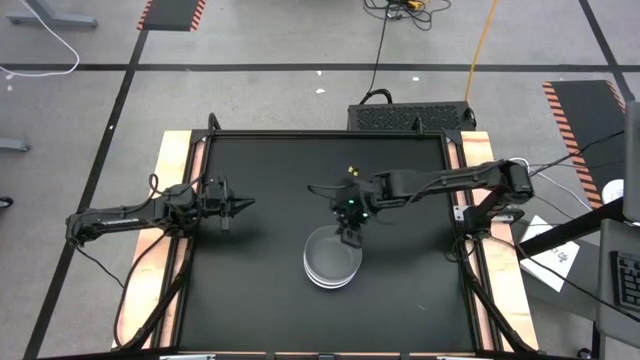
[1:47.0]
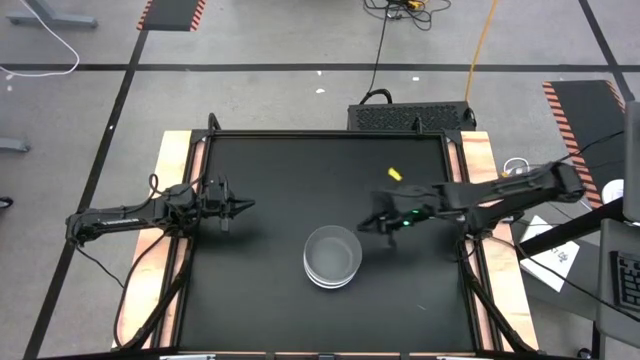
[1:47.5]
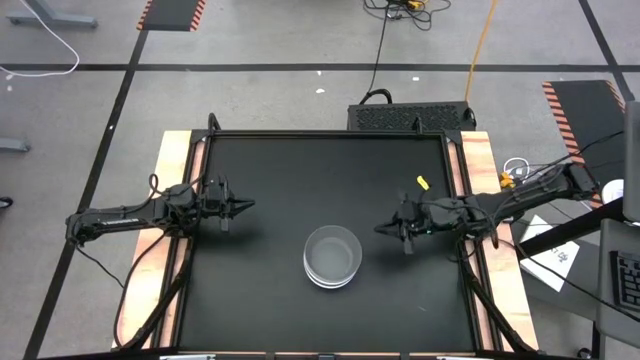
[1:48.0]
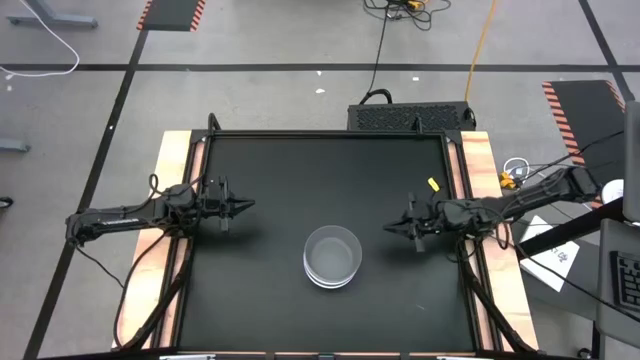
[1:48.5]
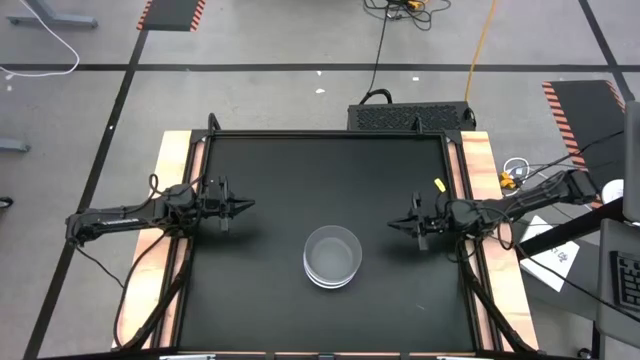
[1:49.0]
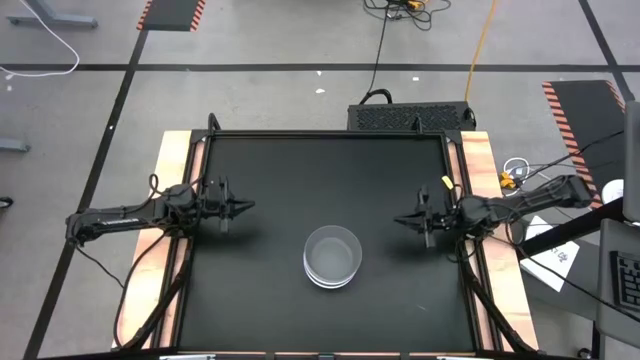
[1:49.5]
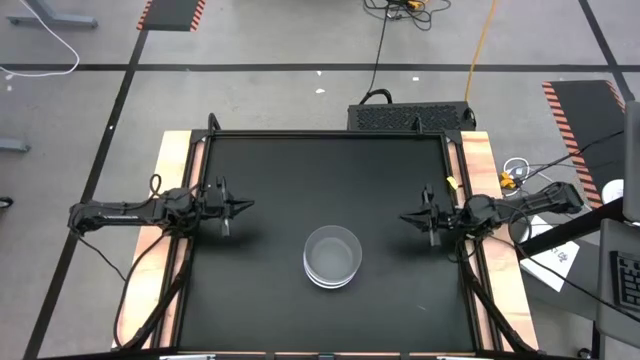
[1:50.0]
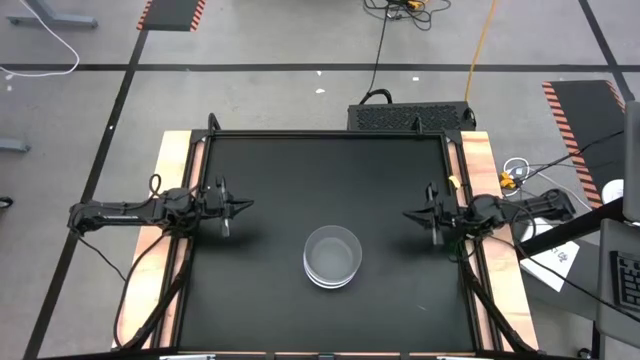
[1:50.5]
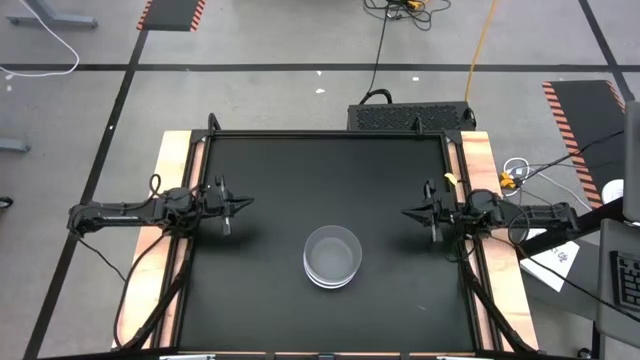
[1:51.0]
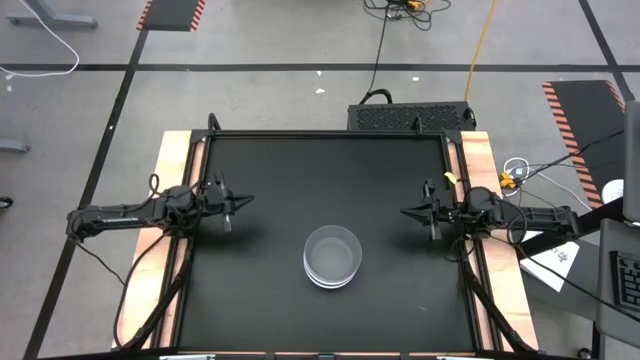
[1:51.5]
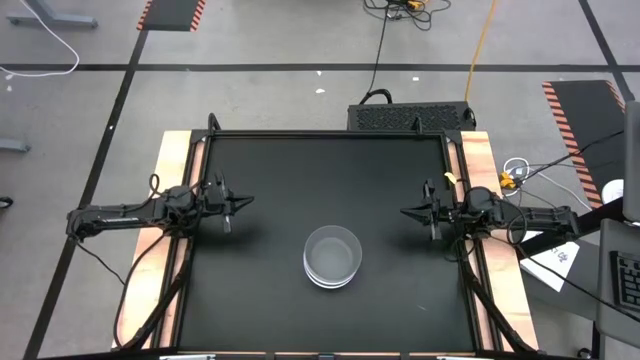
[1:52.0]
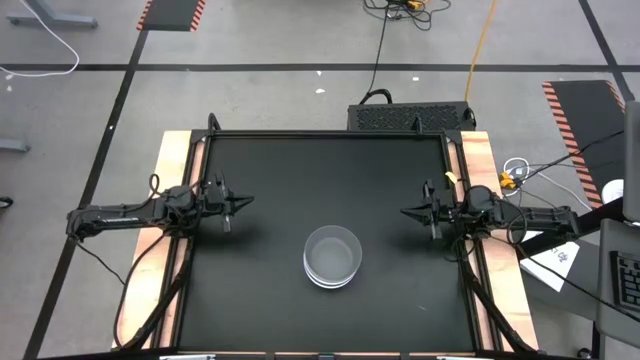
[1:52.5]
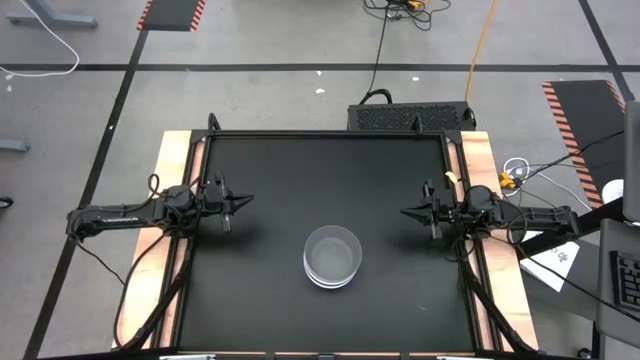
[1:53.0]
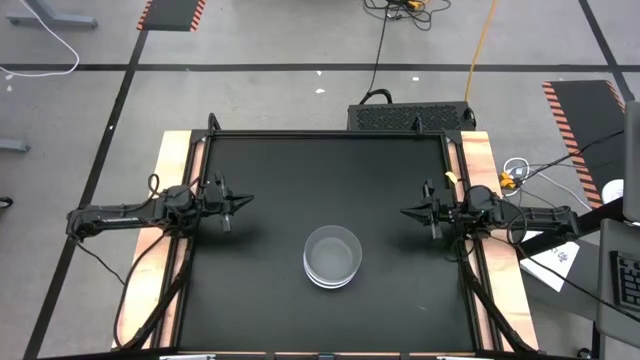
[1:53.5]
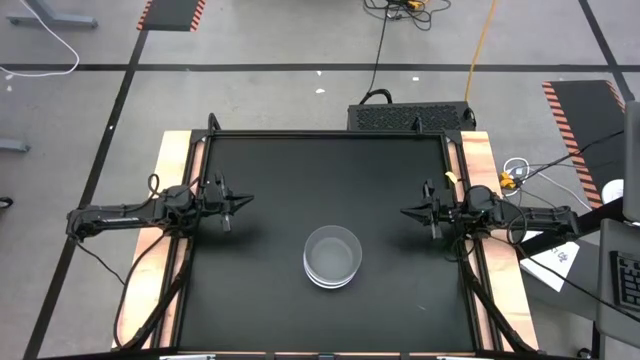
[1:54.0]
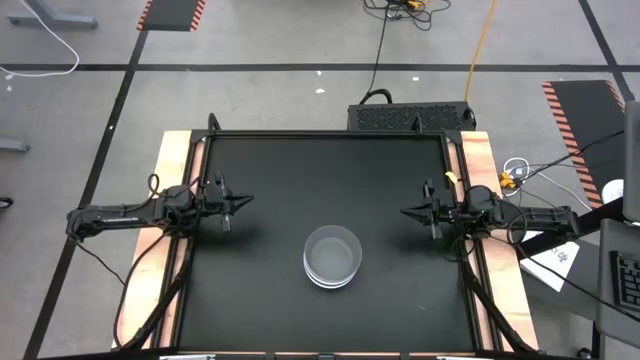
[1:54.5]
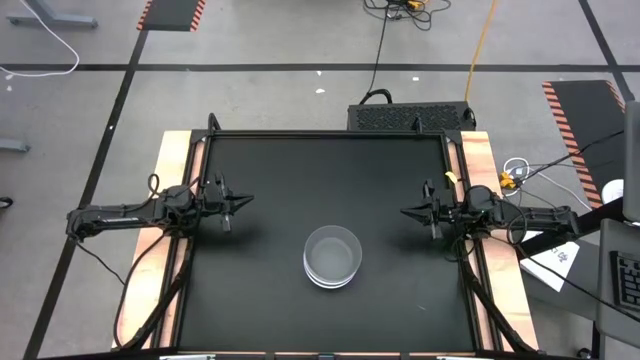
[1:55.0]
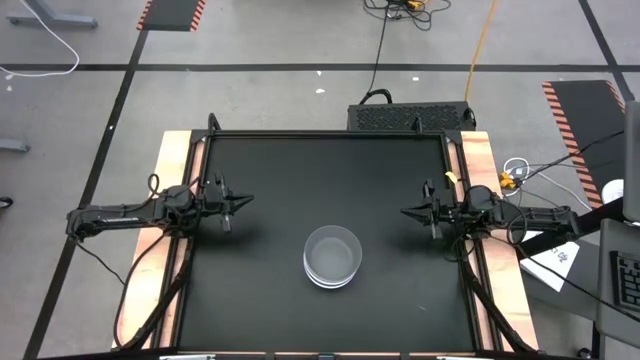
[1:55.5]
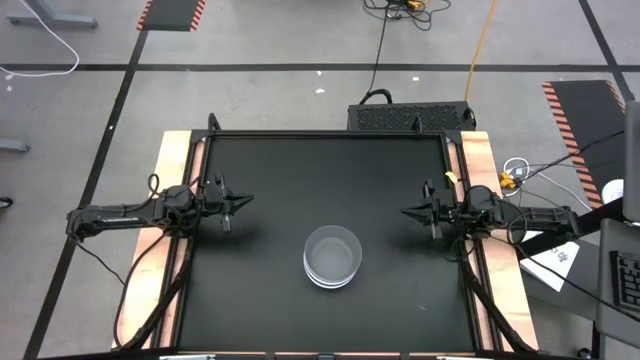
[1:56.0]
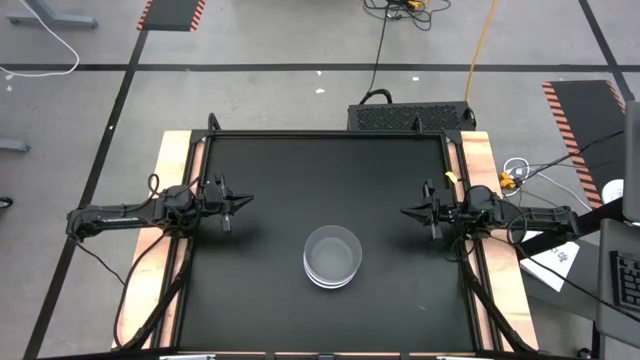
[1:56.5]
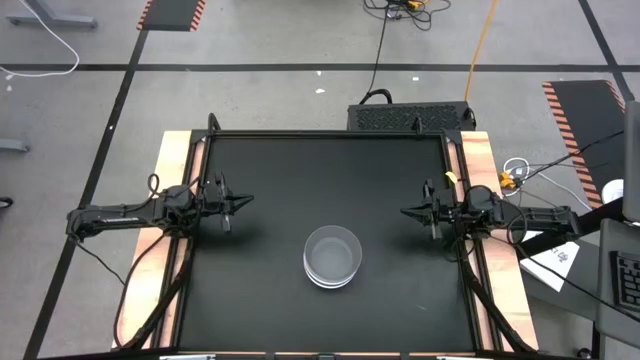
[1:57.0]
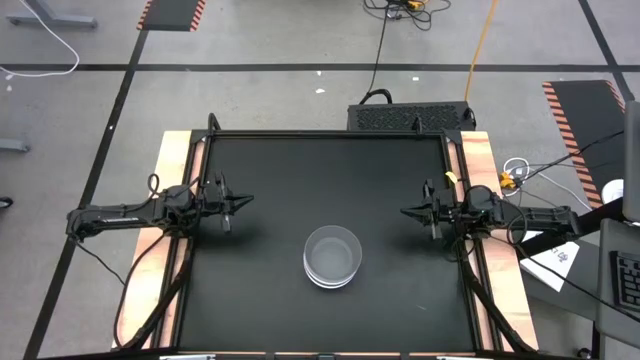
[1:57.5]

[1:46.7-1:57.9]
Task: Nest bowls inside each other
Return to Home Position

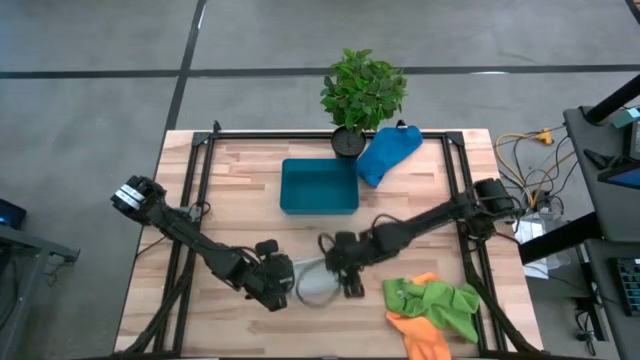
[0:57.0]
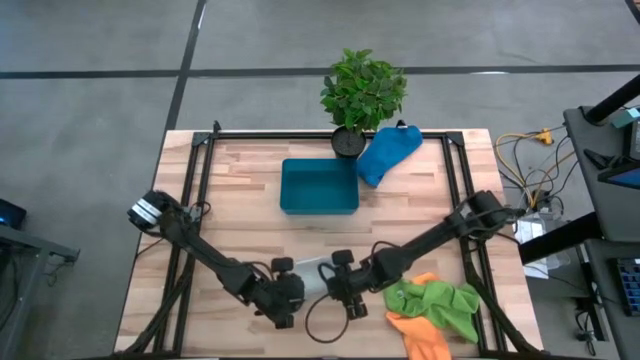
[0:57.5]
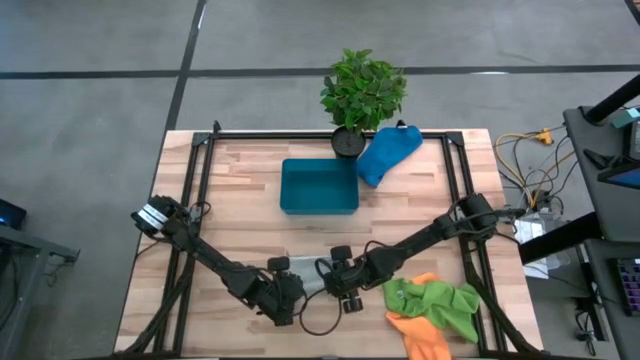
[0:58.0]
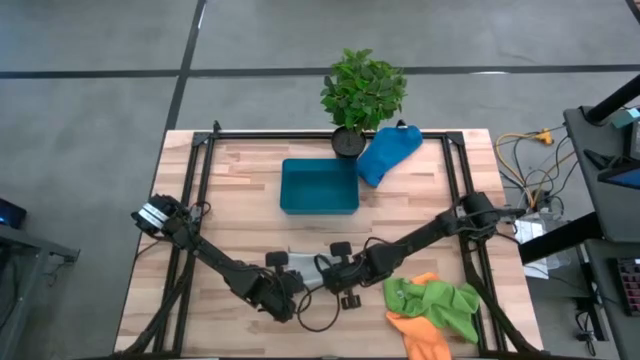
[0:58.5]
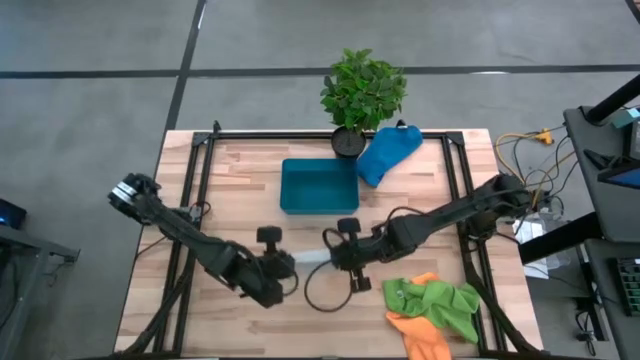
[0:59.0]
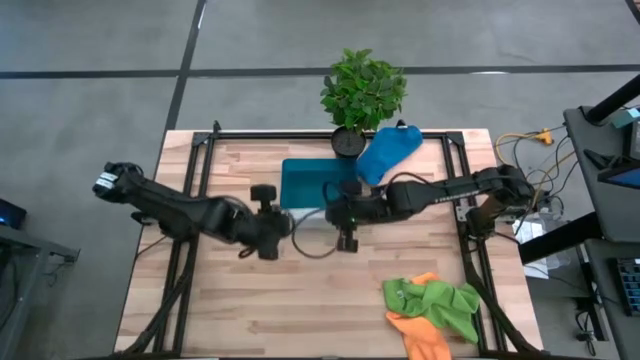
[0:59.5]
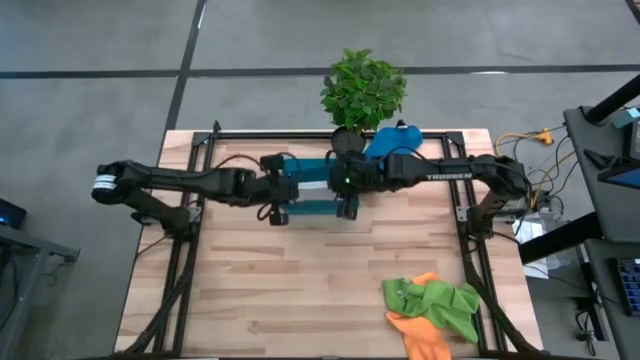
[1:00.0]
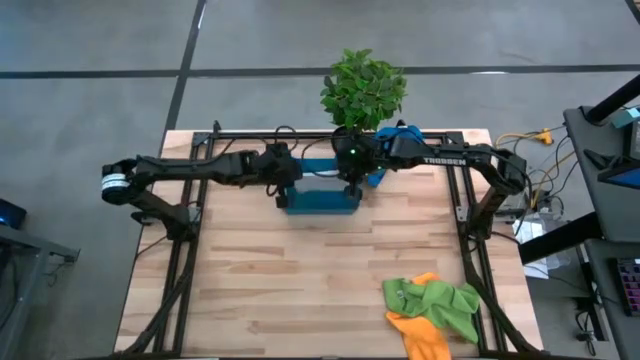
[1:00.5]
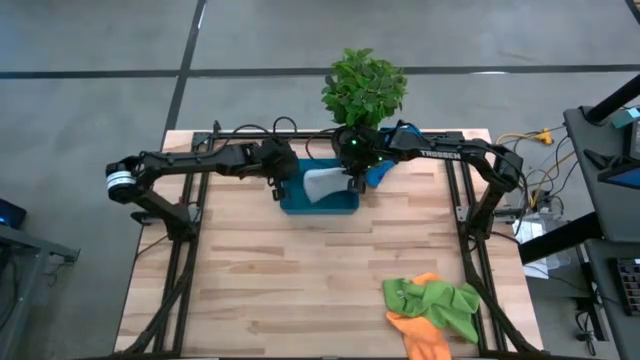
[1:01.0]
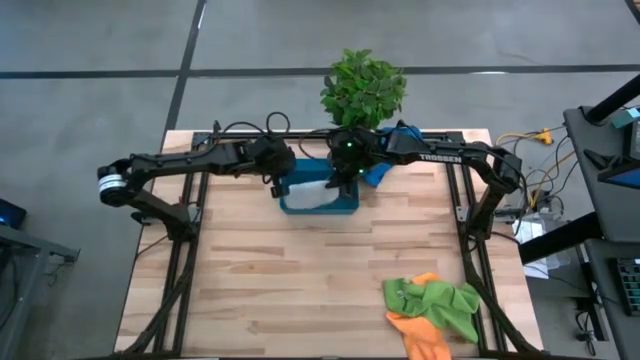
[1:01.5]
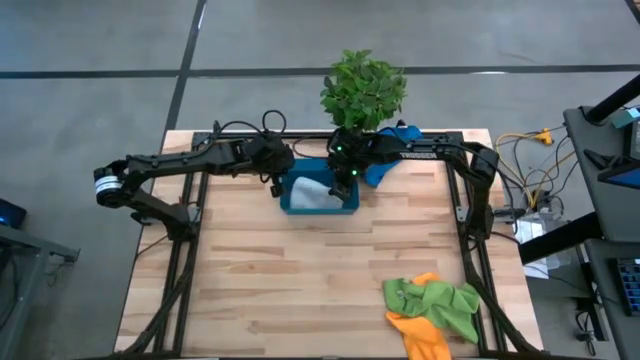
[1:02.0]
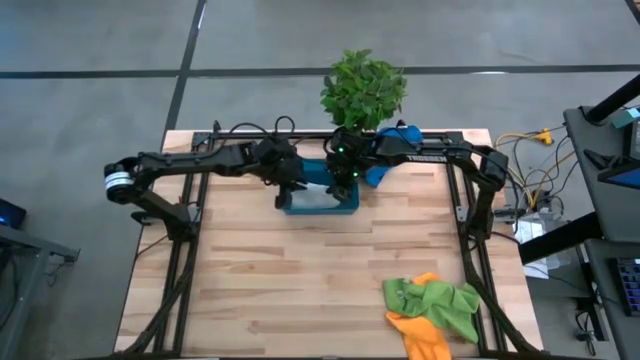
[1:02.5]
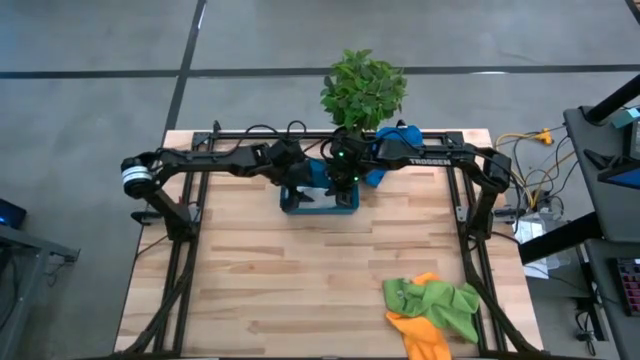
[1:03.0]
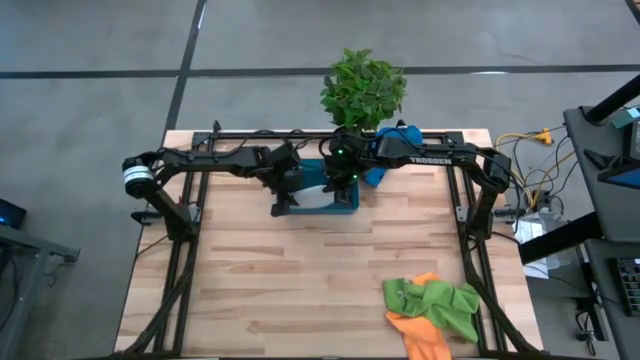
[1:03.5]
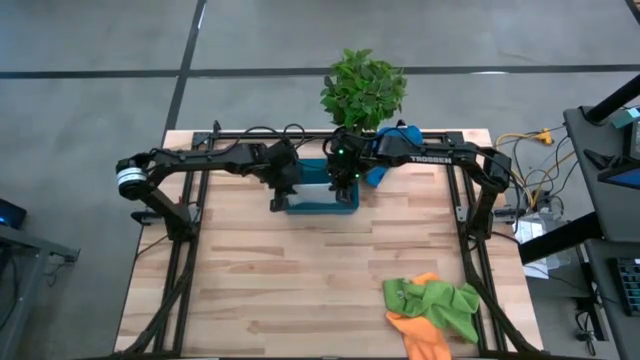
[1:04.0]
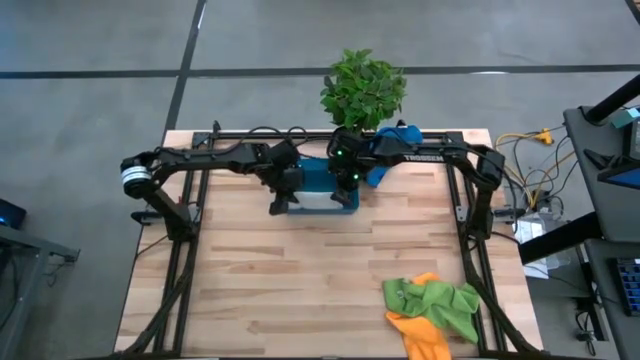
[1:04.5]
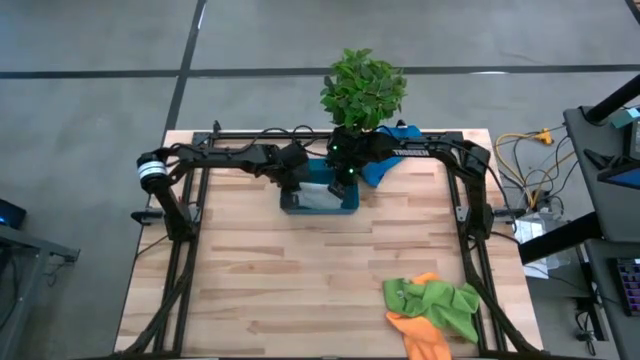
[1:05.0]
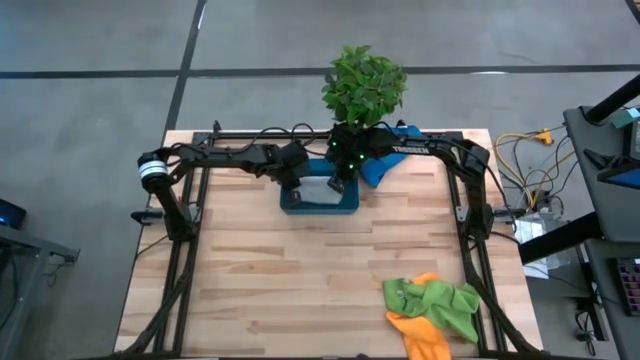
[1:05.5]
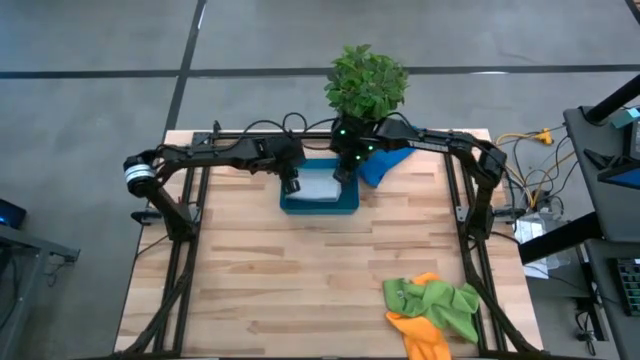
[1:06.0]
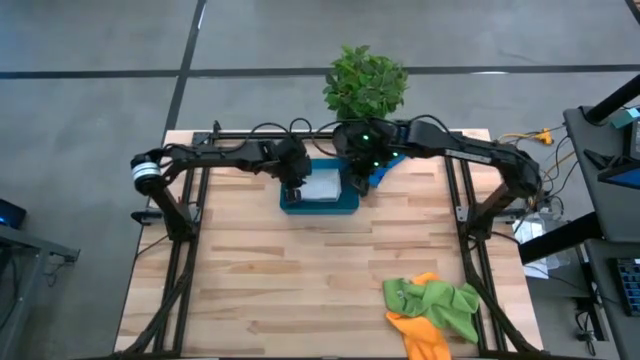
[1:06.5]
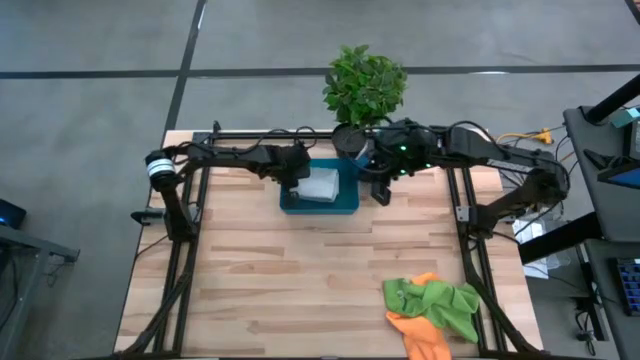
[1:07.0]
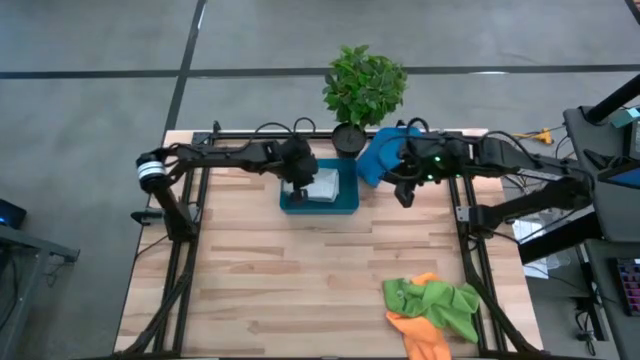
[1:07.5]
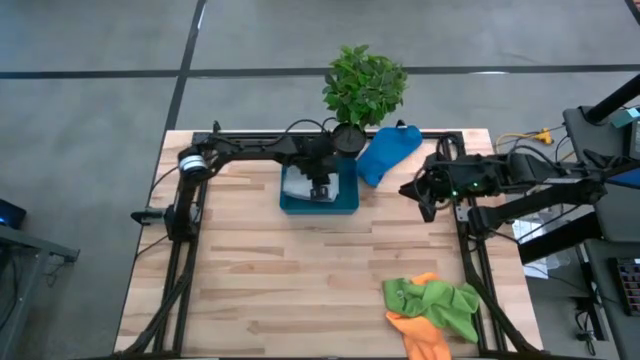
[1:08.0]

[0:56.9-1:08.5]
Task: Fold microfiber towels
Put the gray microfiber towel in the blue bin
